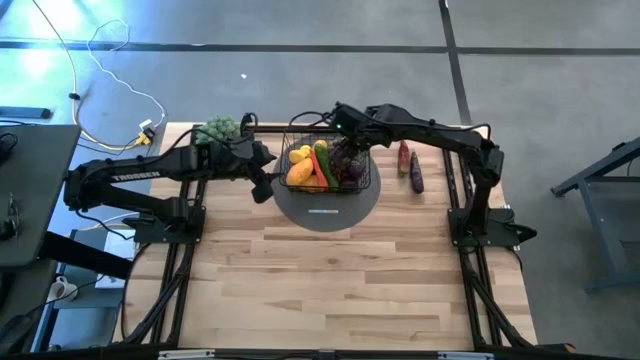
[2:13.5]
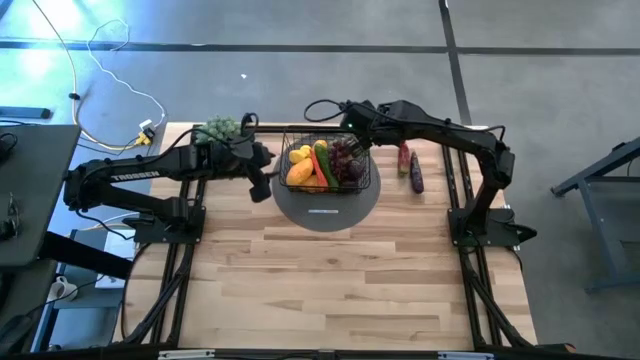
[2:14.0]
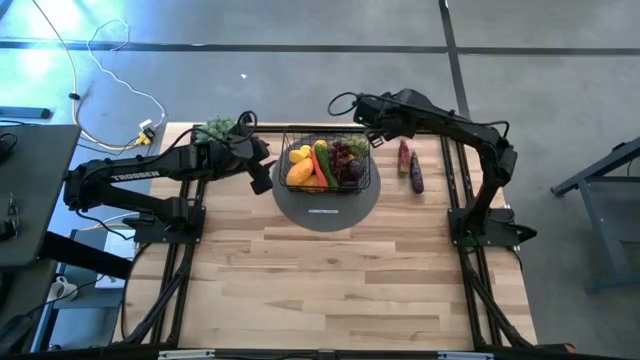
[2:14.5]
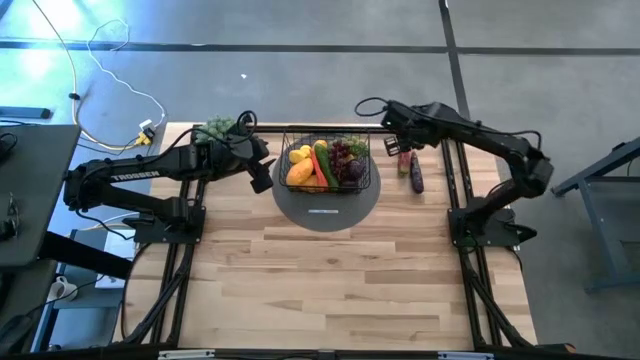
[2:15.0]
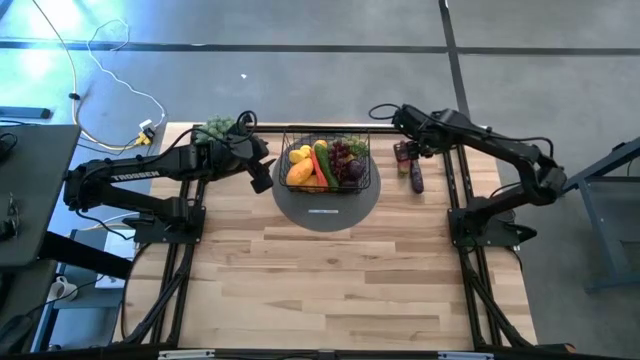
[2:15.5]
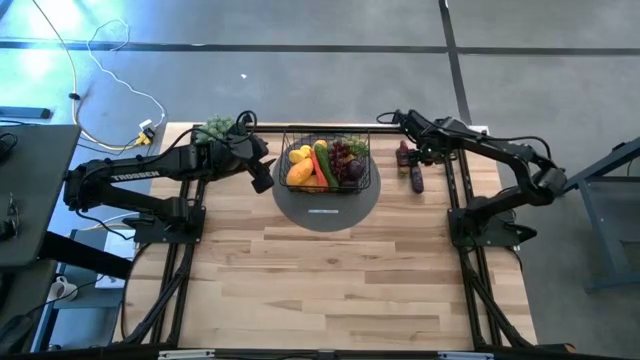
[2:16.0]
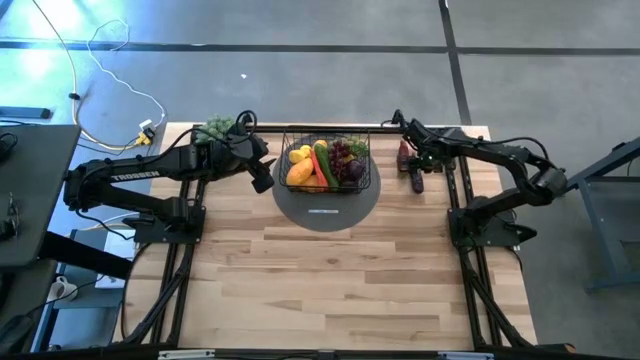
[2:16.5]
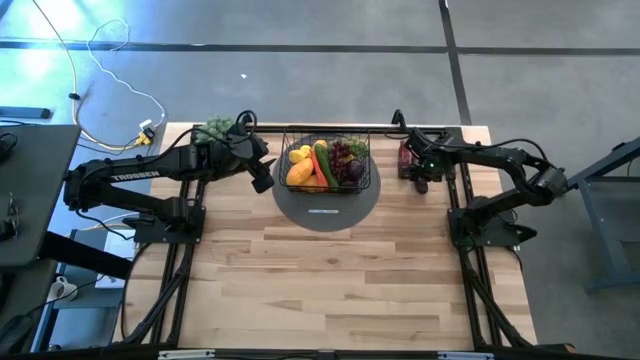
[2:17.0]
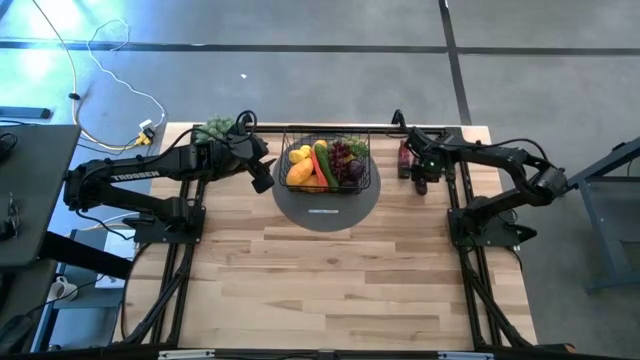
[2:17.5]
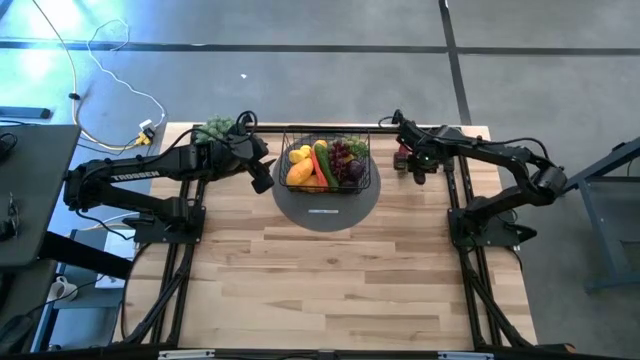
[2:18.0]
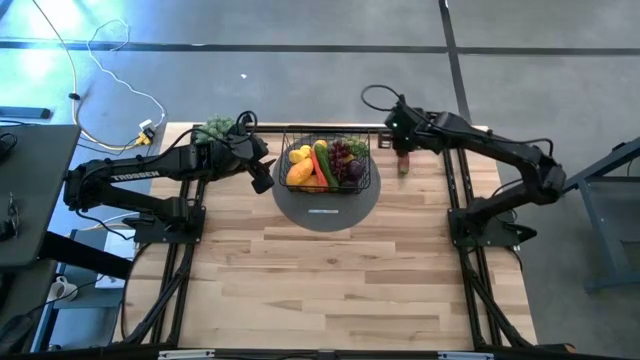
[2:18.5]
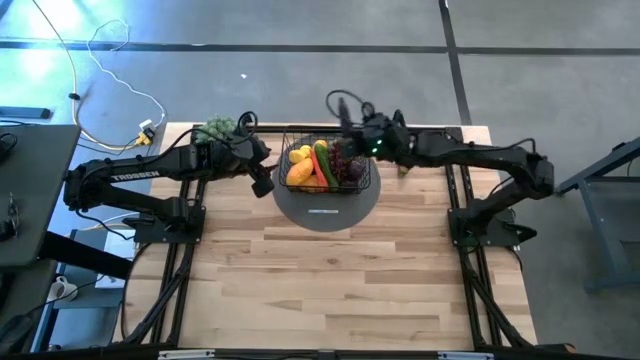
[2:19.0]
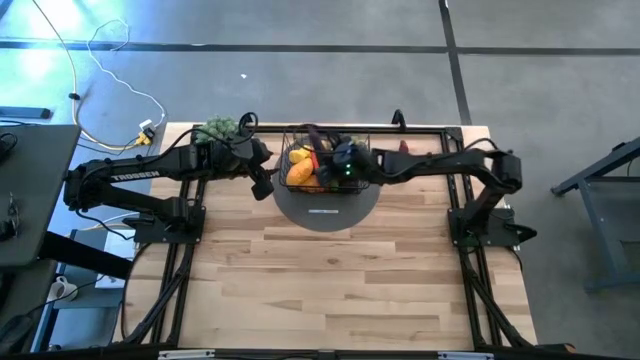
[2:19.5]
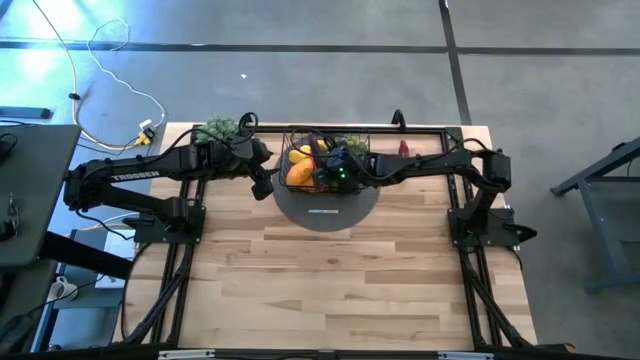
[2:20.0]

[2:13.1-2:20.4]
Task: Build produce basket
Put the purple eggplant into the wire basket

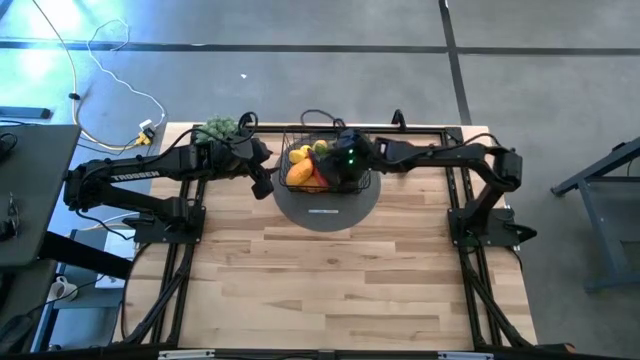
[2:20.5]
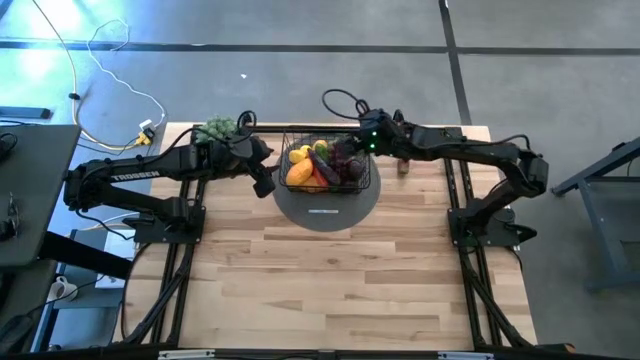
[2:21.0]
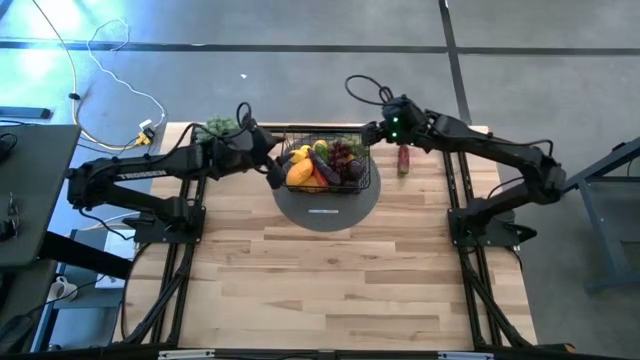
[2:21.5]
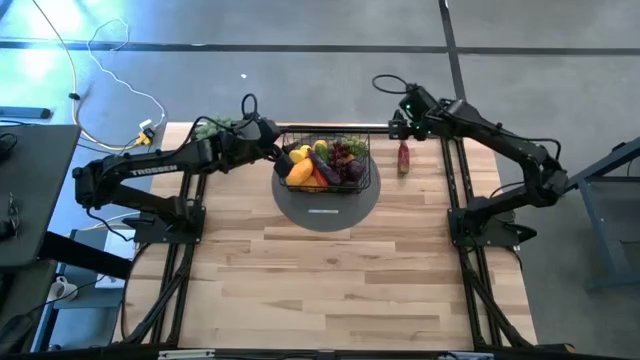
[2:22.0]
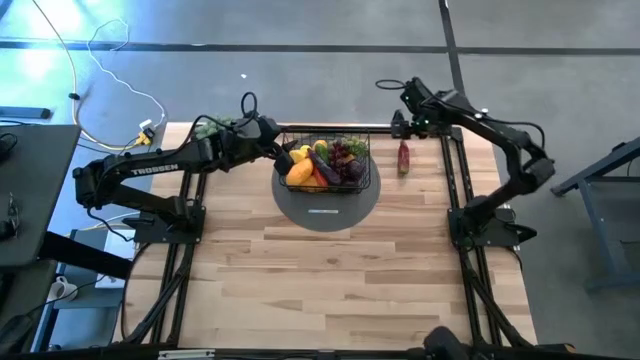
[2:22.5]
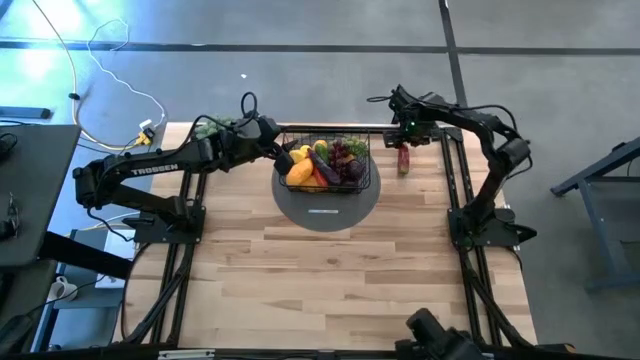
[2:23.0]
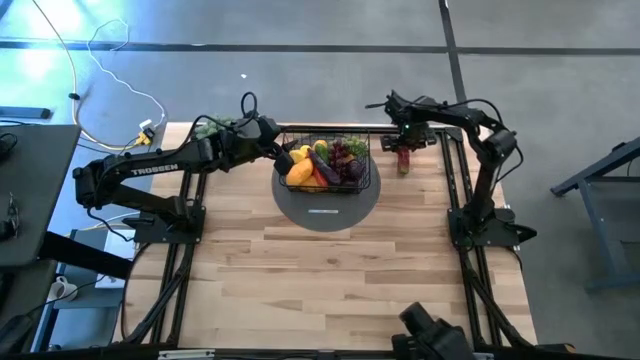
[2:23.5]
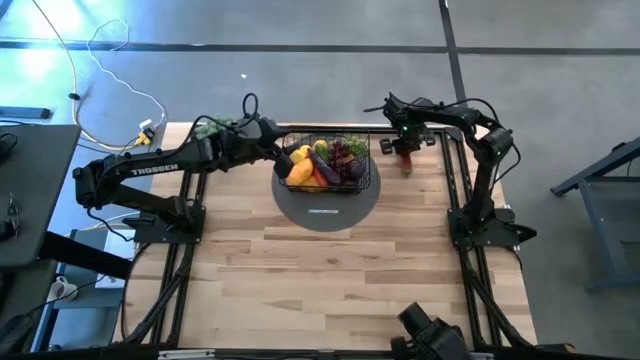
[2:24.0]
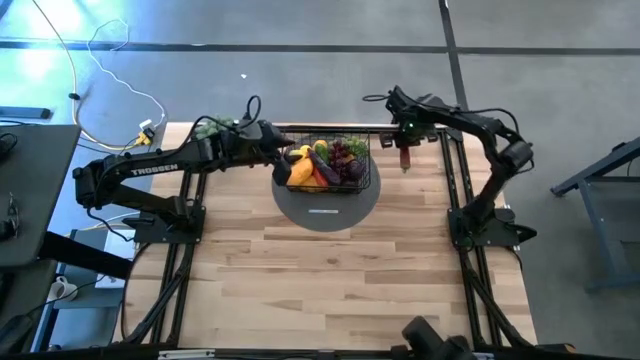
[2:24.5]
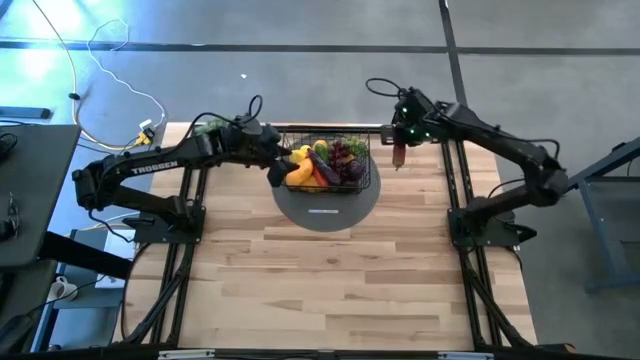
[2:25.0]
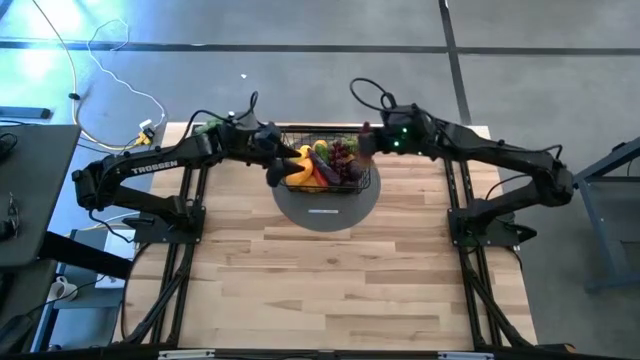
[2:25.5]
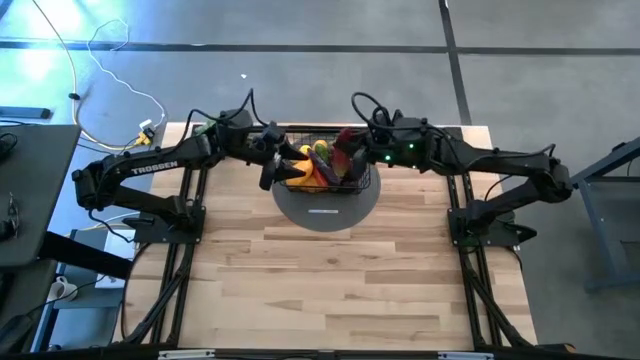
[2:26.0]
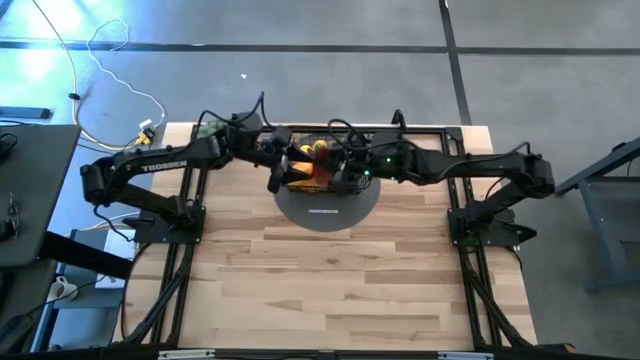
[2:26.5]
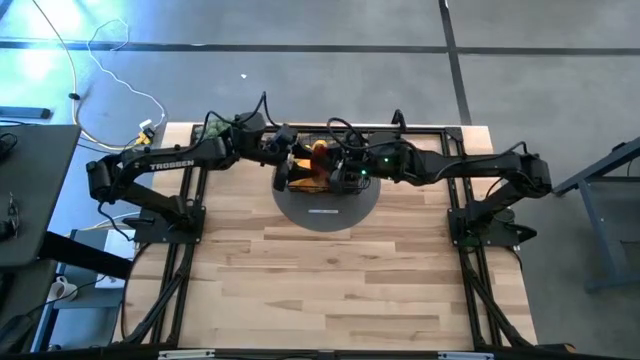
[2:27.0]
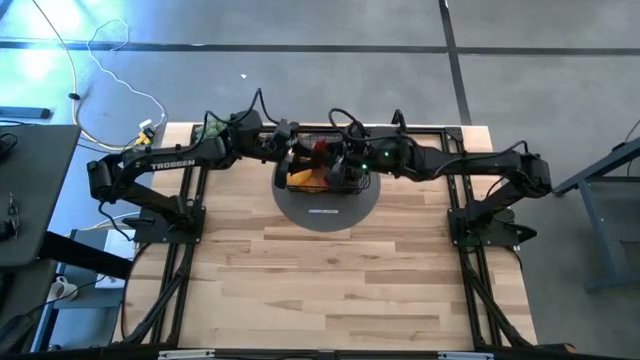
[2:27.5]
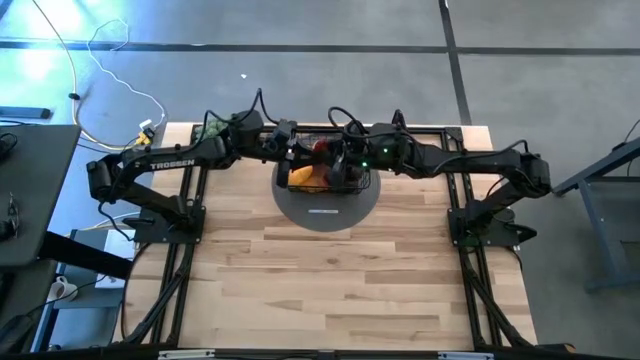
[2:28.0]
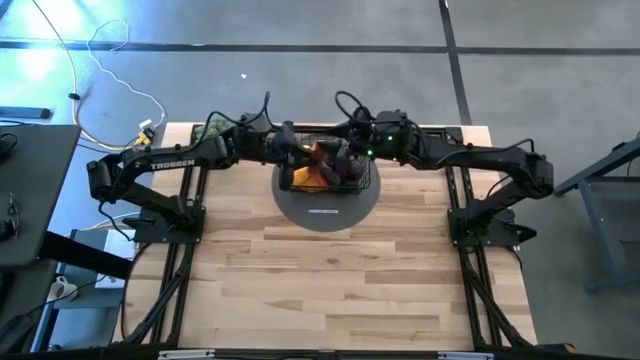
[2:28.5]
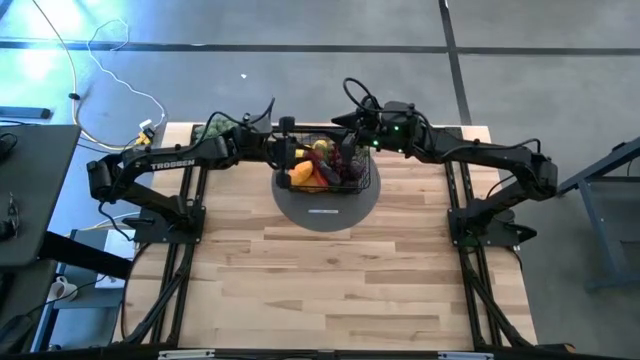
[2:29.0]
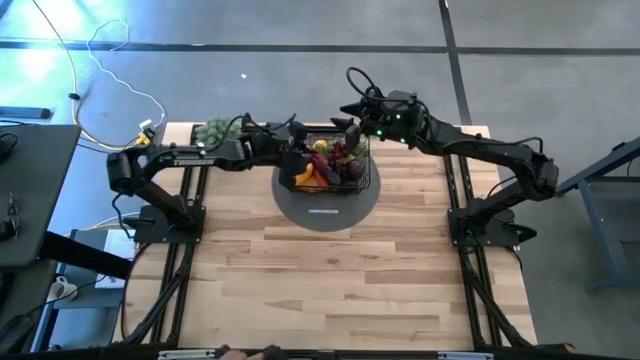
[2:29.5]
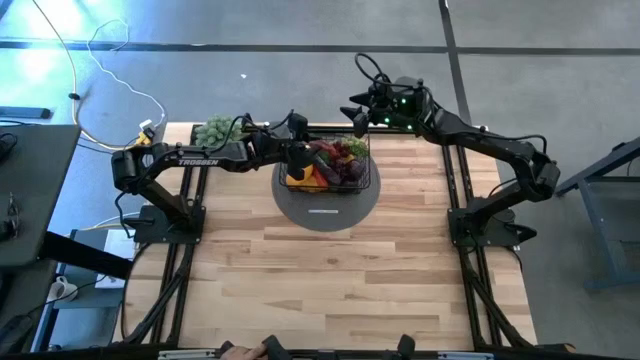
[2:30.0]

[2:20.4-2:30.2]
Put the red chili pepper into the wire basket

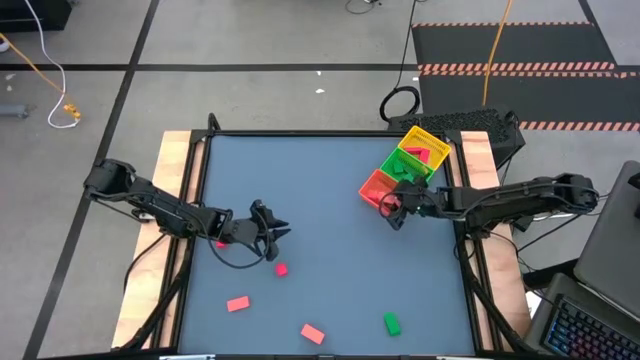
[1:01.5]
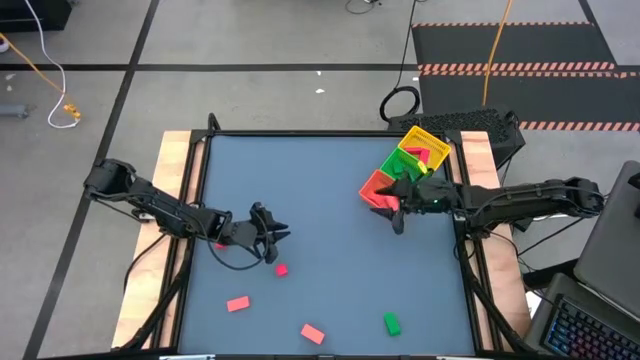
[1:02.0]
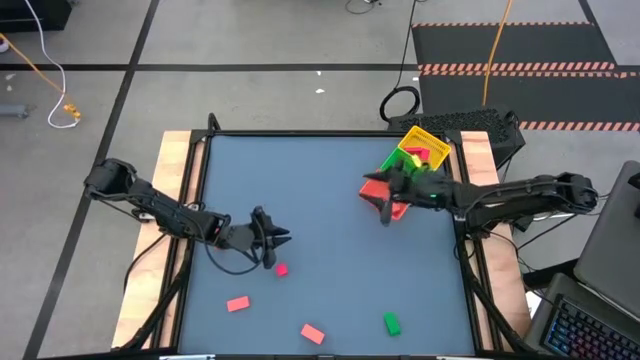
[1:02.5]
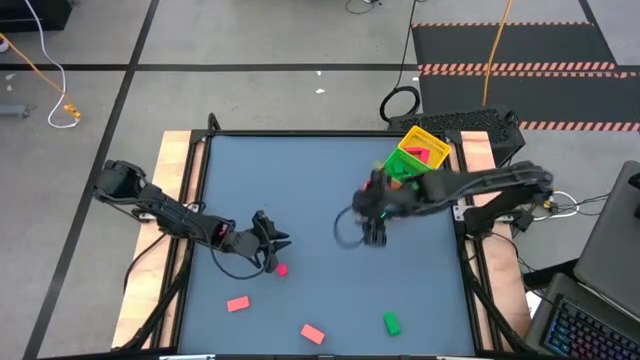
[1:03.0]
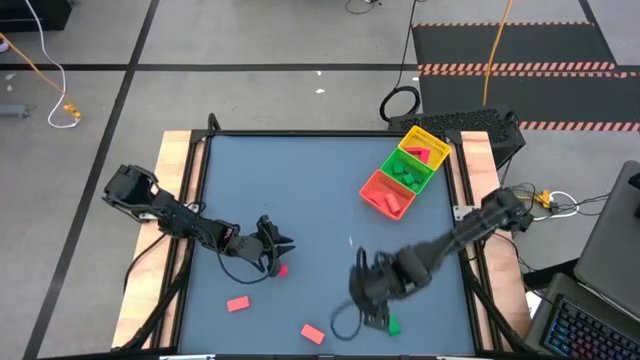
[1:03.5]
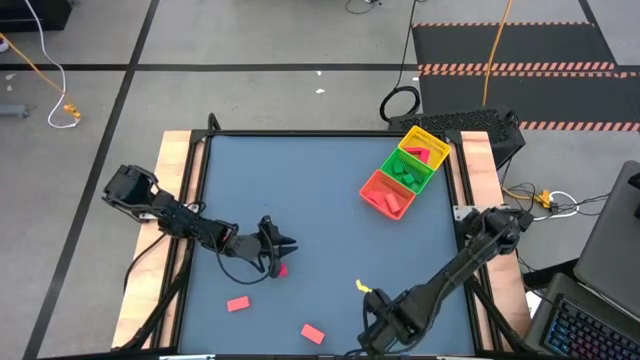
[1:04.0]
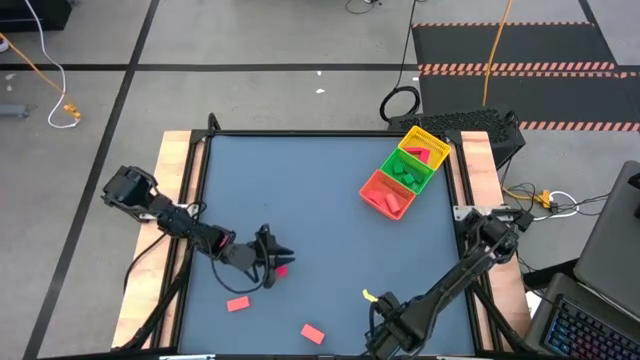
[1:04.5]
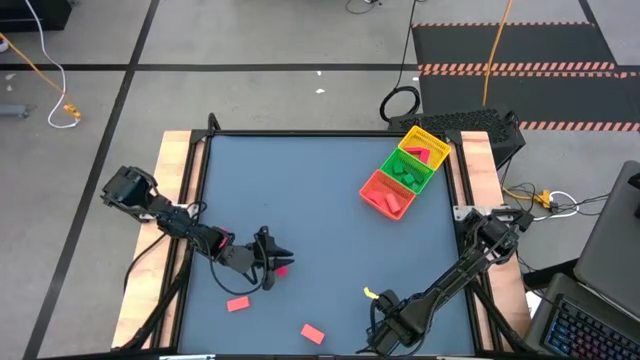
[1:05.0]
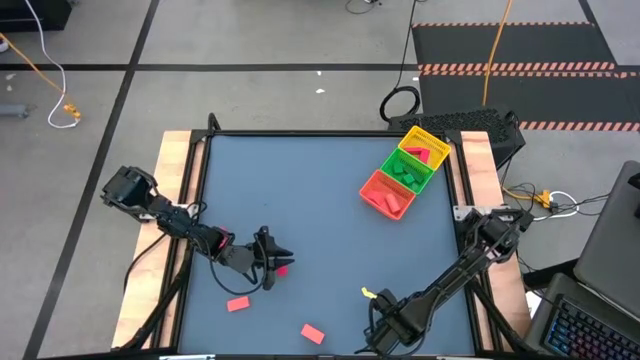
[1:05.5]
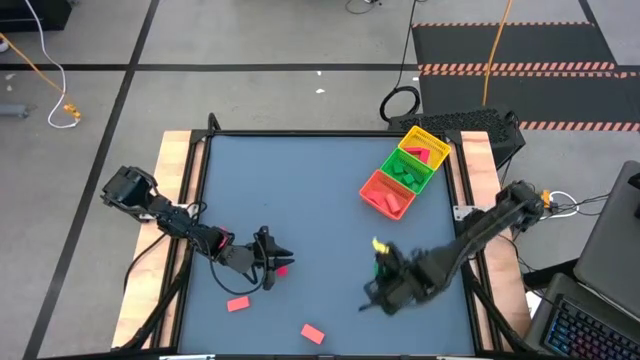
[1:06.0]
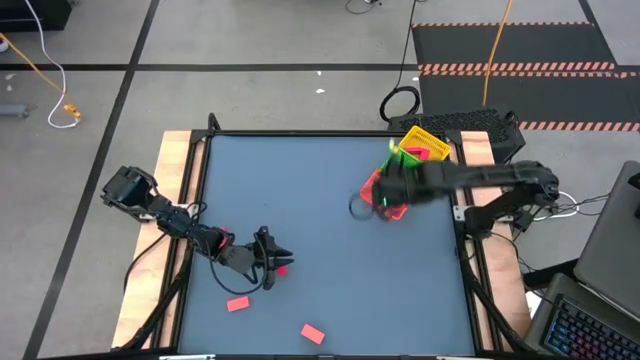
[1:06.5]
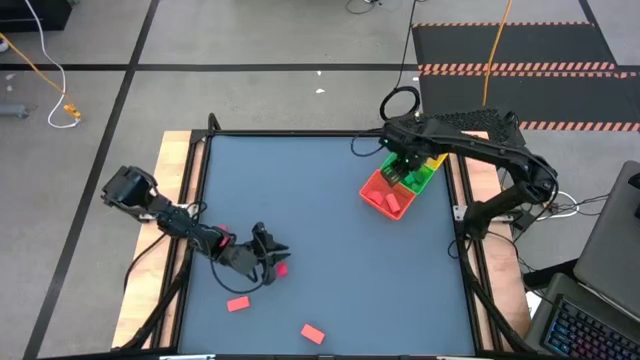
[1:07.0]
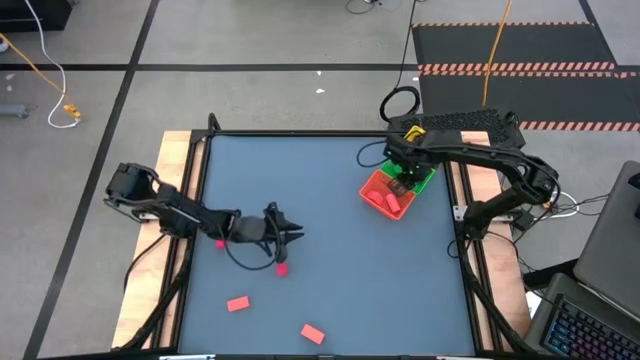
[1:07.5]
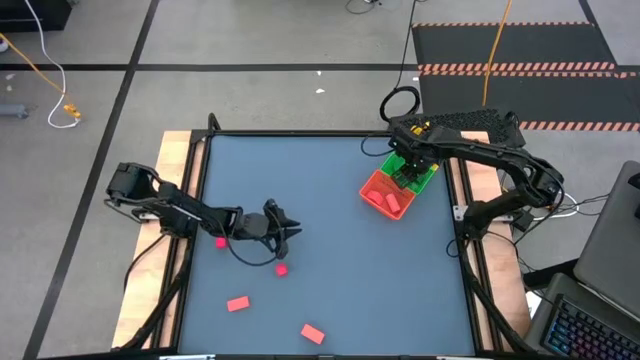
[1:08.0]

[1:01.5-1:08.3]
Task: Sort & place blocks by color
Put the green block into the green bin
